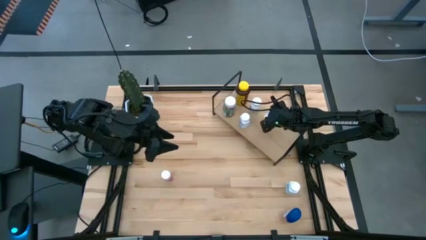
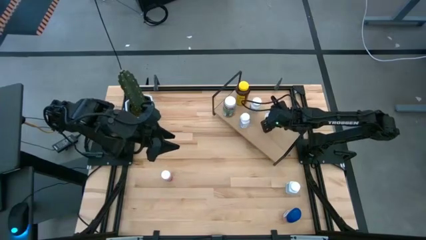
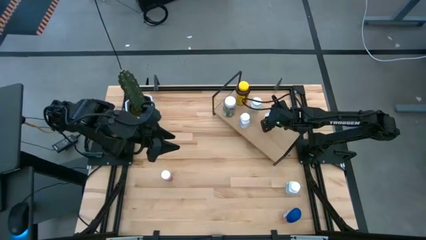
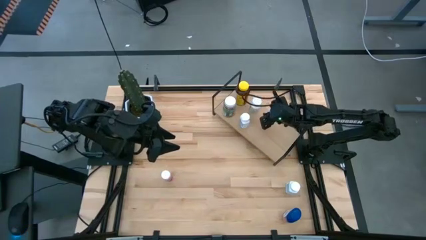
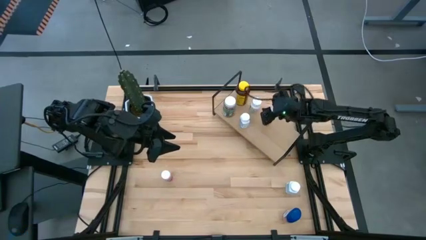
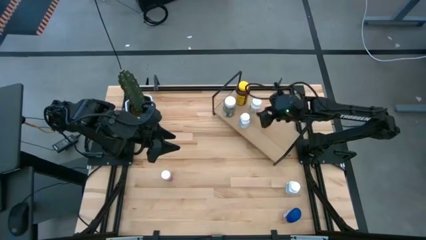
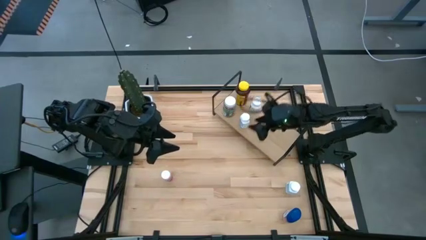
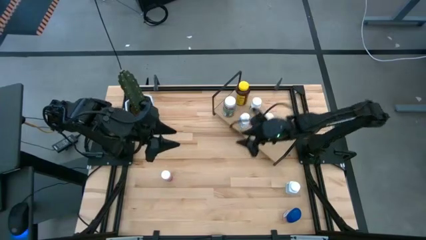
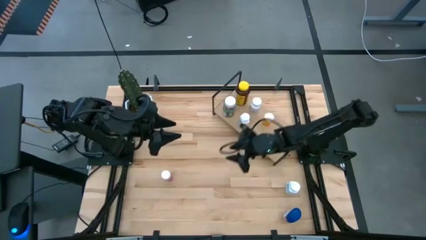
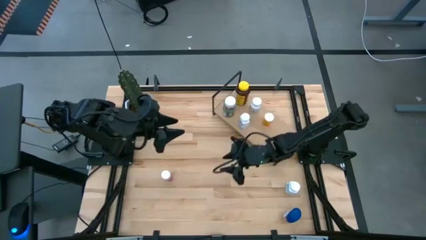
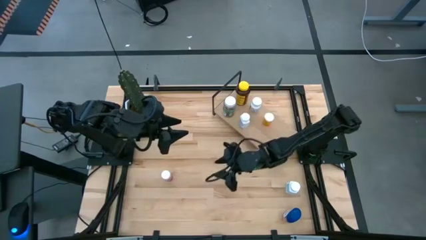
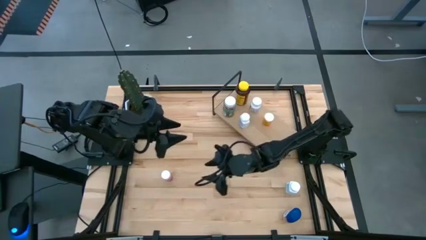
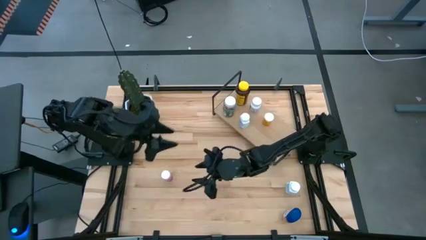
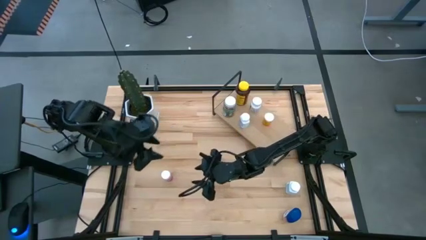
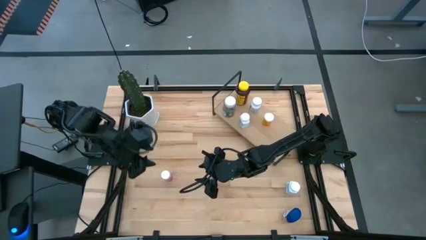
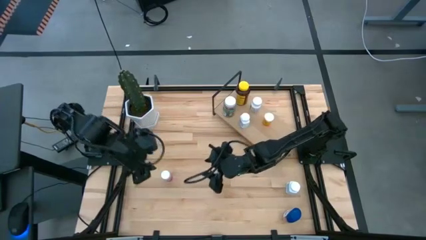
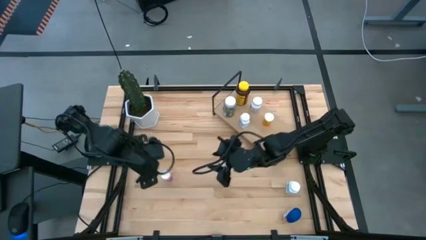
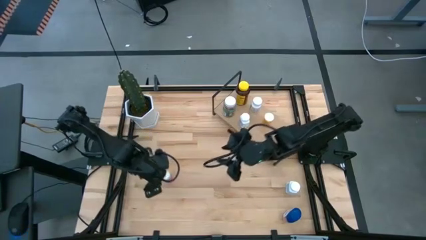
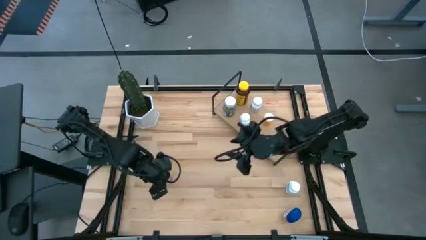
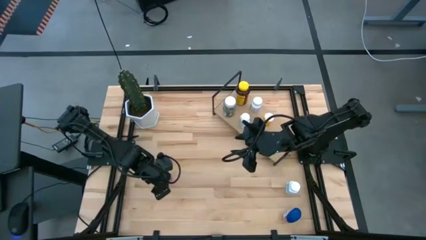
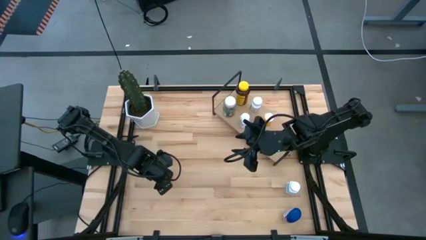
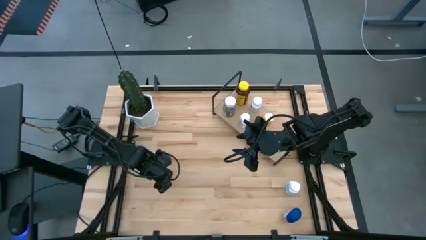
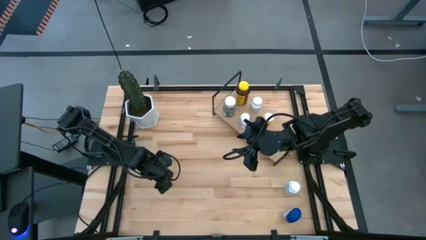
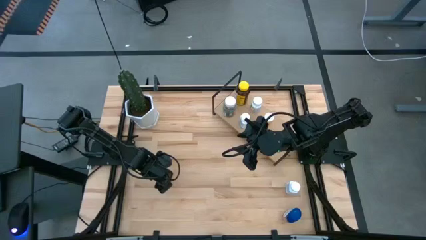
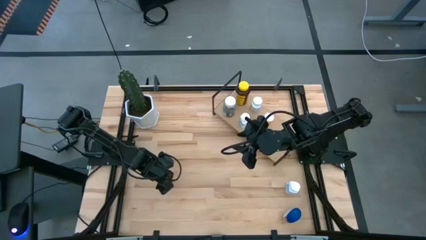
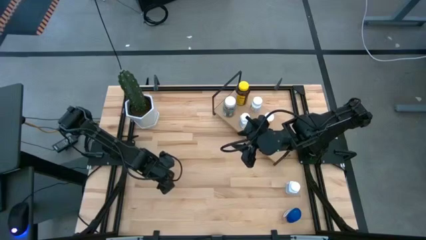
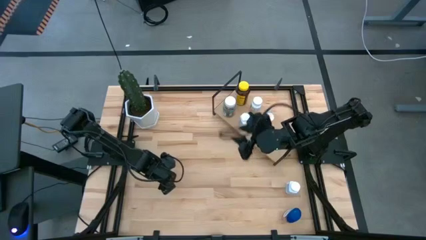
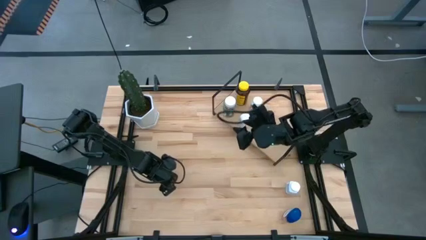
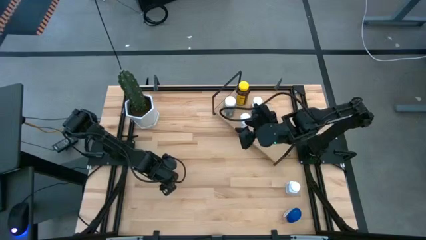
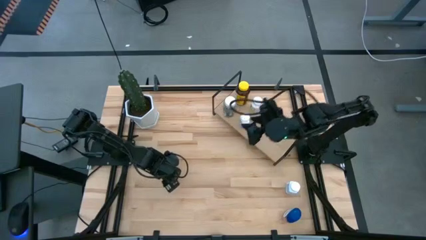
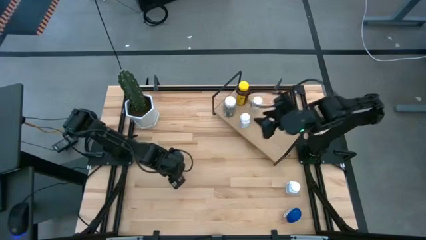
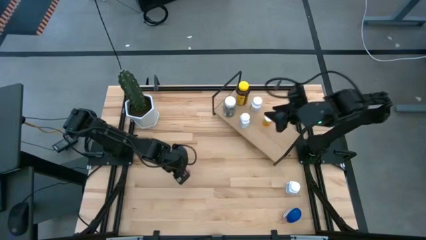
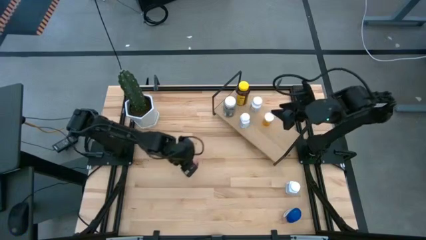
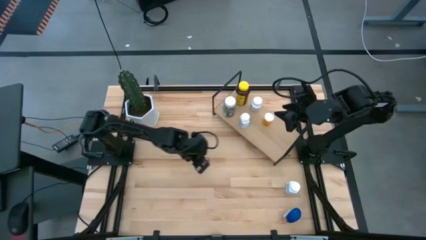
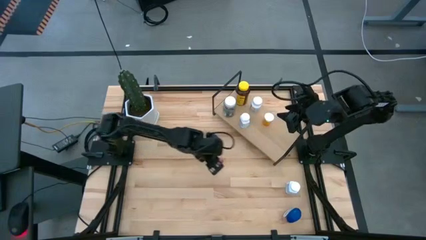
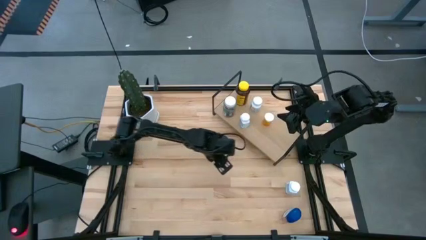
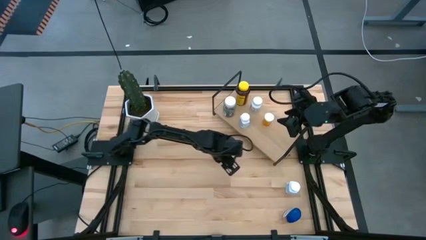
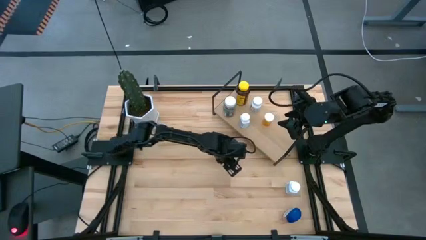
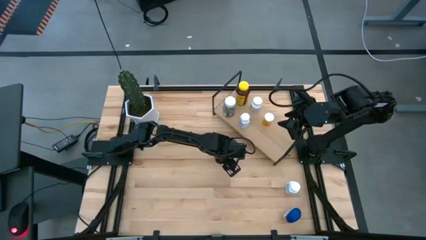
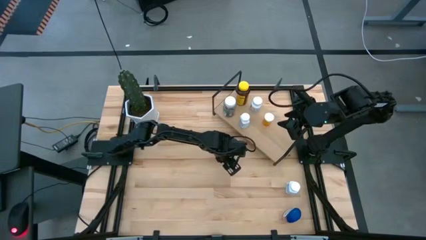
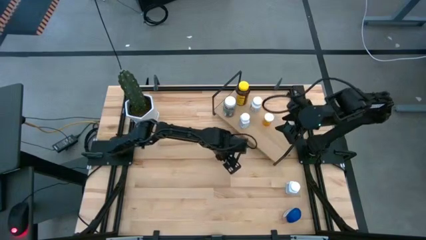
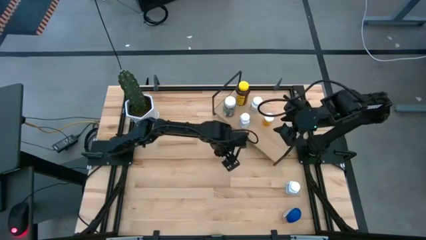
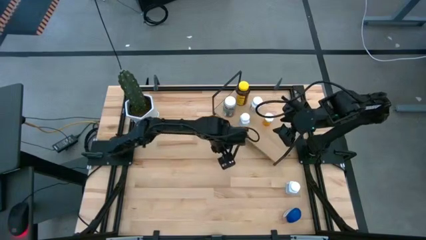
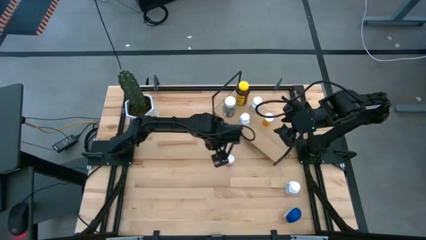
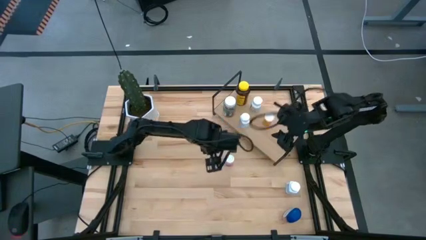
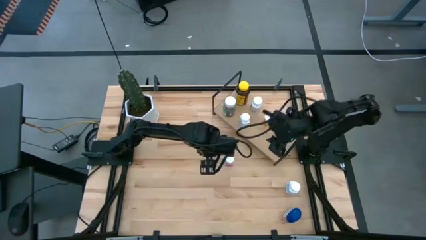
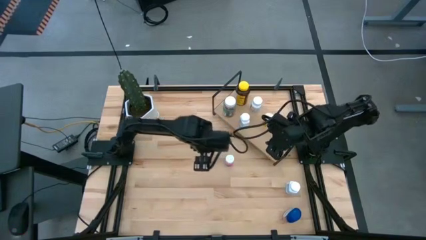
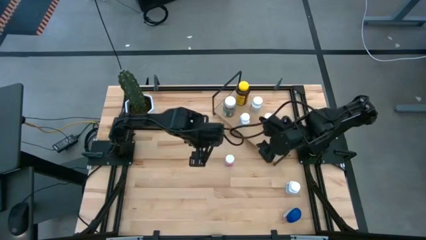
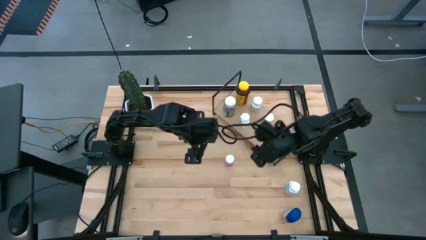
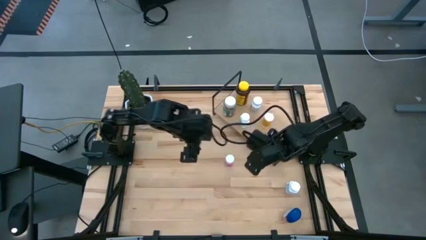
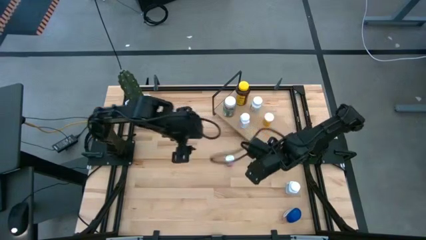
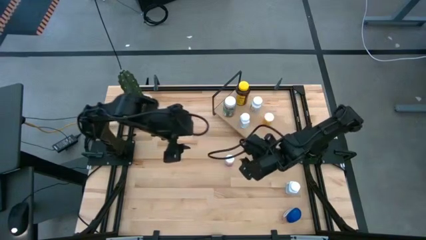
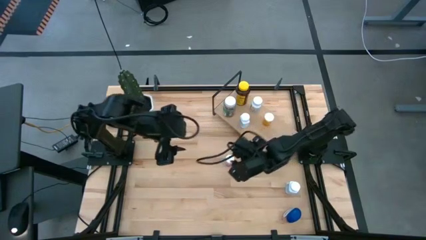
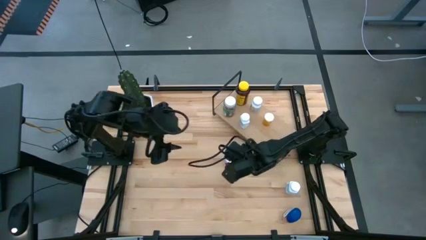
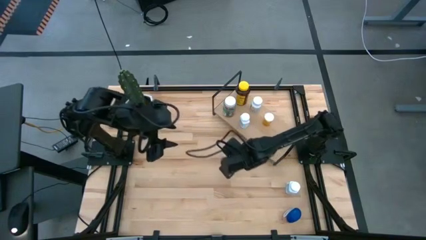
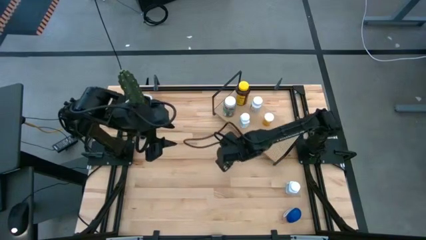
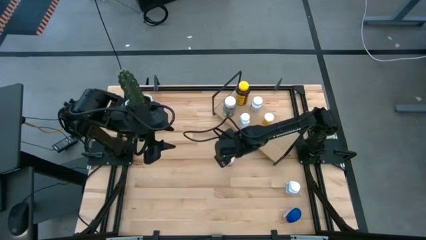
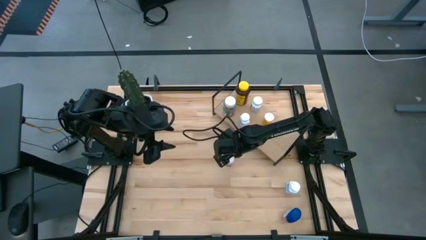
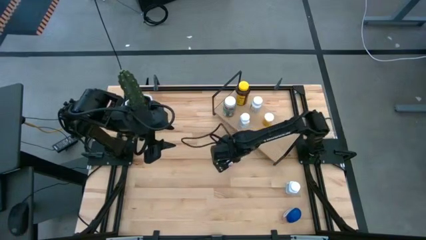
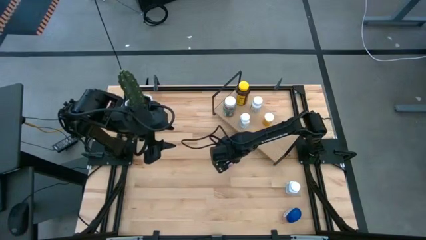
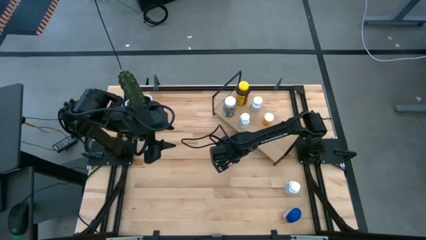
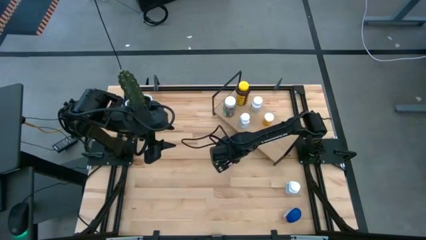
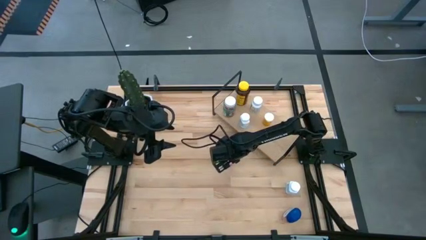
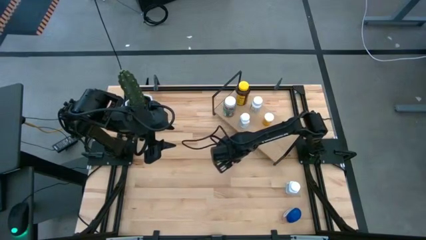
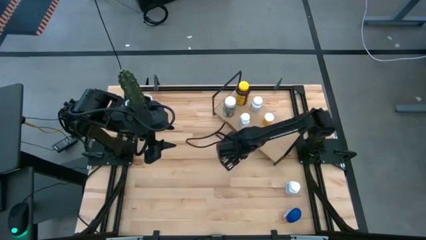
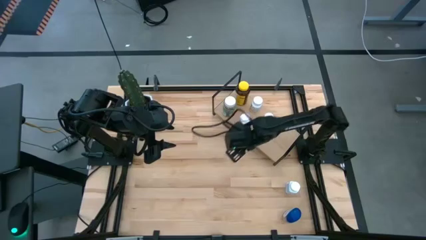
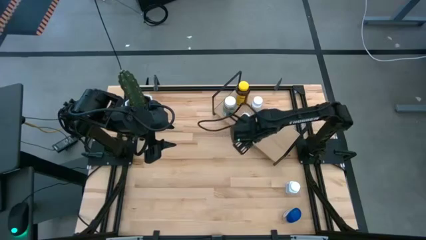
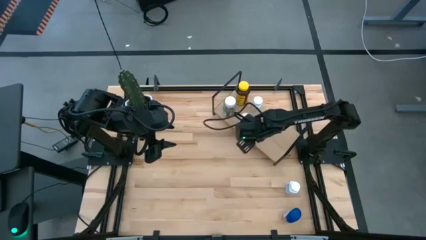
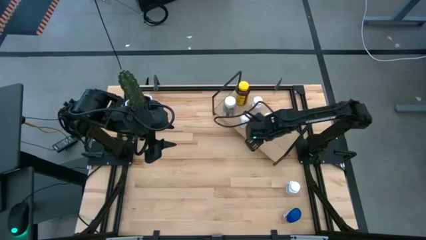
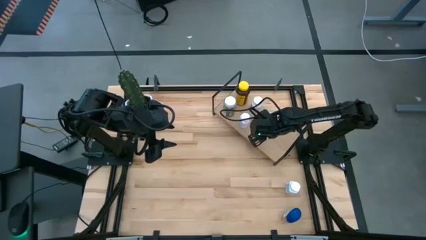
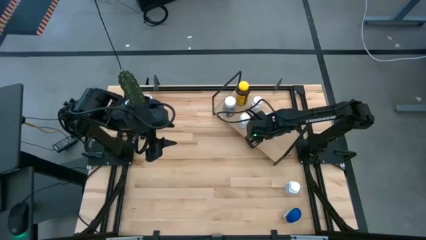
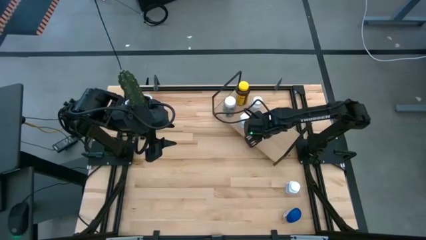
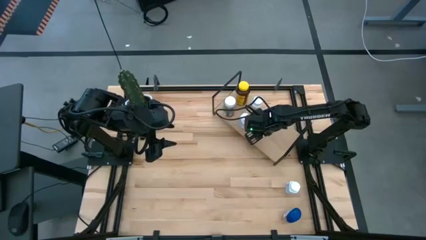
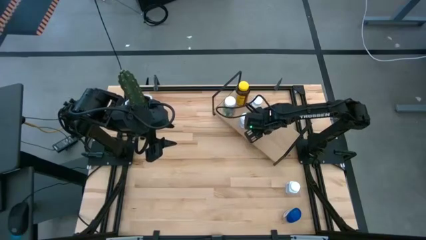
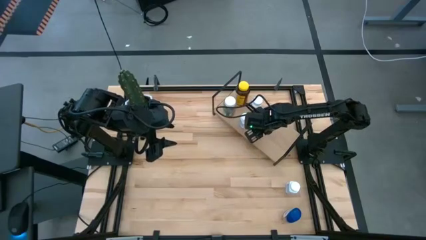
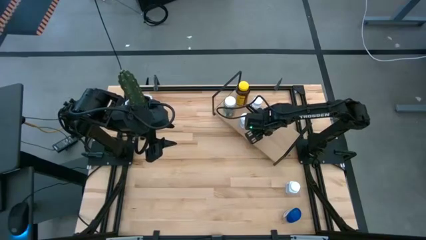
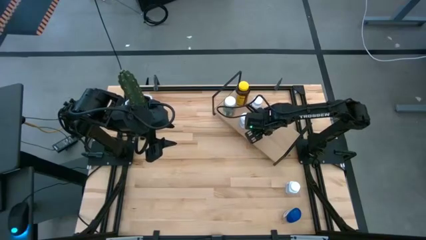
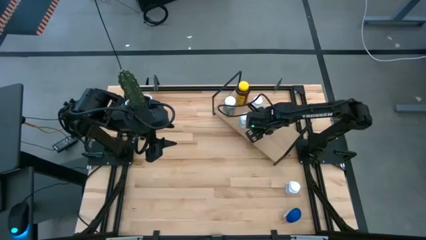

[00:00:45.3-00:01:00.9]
Task: Pick and place medicine bottles onto shelf by color
Put the pink medicine bottle on the shelf

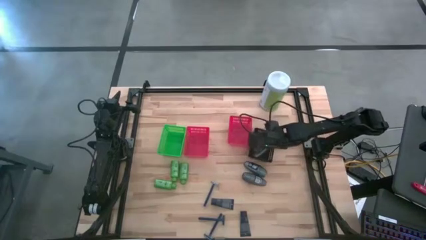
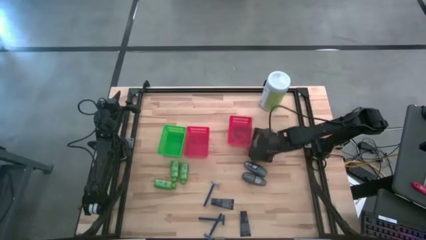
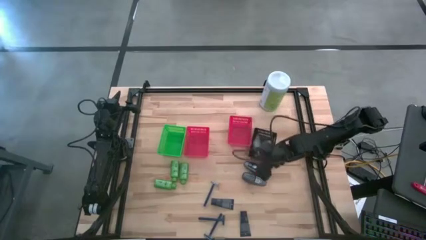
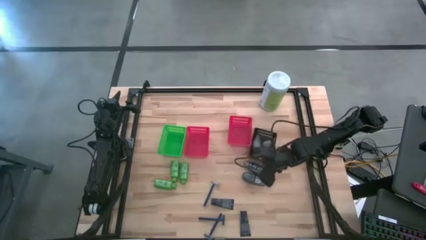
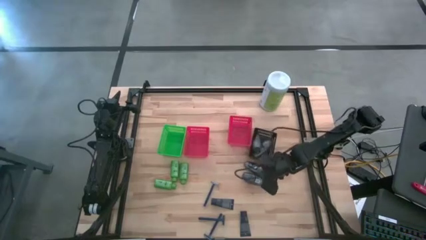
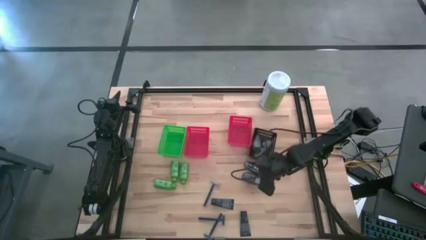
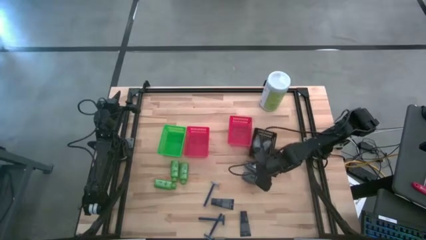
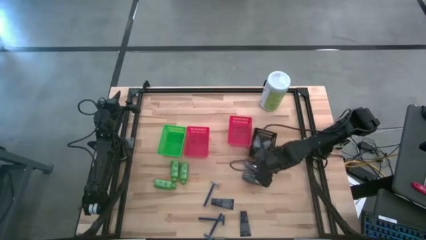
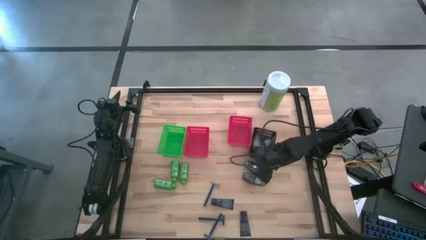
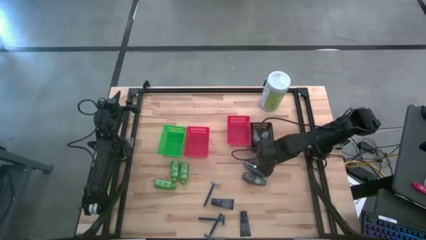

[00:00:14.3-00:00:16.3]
Task: Pick & Place Travel size toiletries
Adjust the black basket
